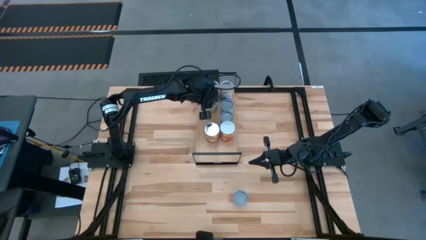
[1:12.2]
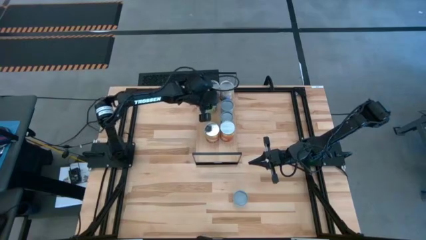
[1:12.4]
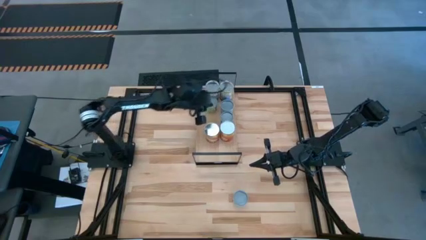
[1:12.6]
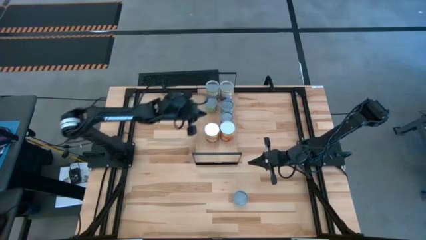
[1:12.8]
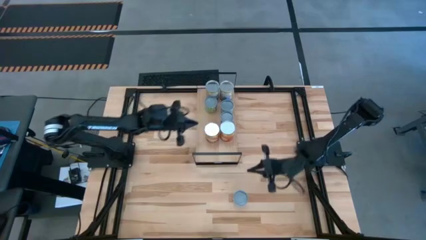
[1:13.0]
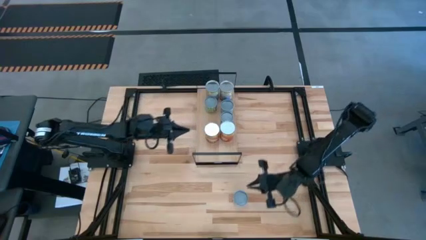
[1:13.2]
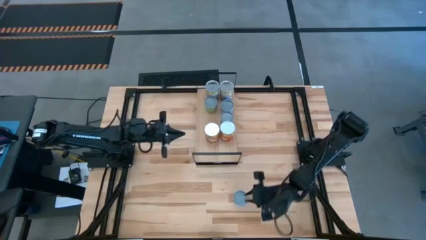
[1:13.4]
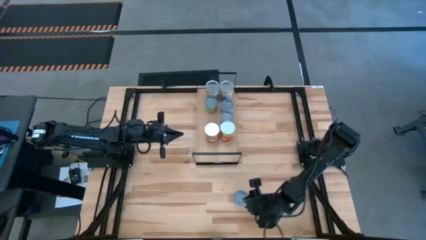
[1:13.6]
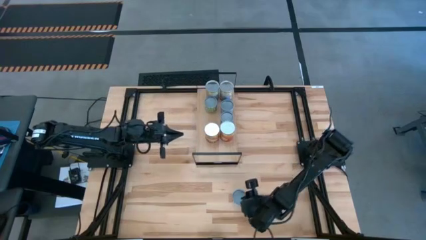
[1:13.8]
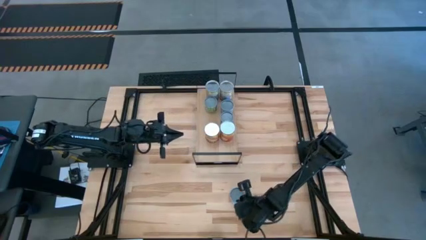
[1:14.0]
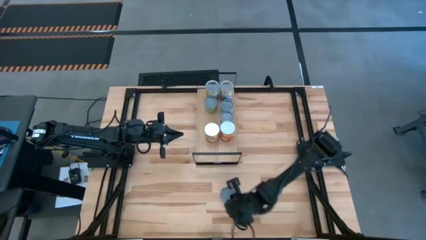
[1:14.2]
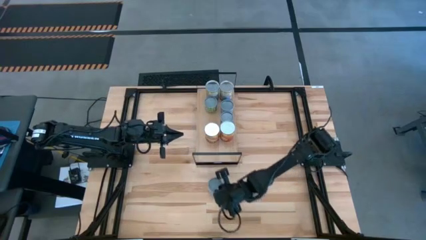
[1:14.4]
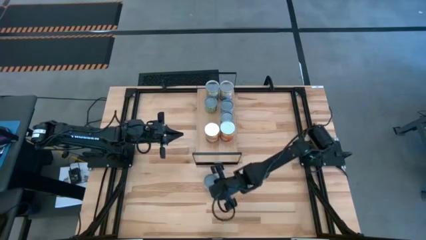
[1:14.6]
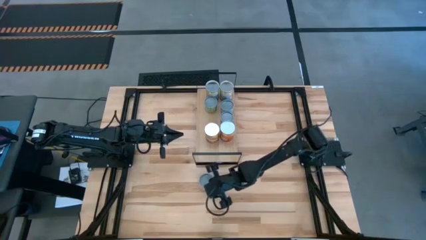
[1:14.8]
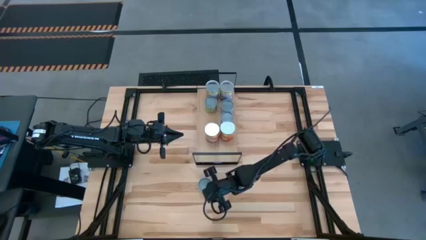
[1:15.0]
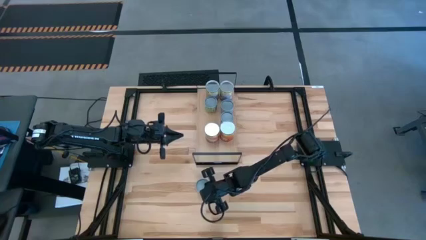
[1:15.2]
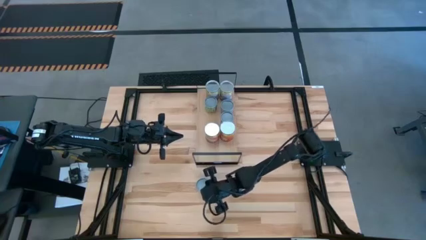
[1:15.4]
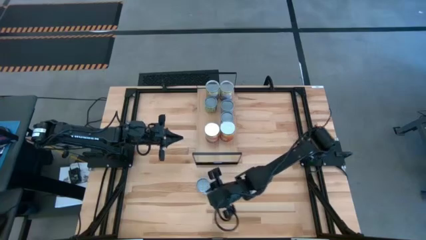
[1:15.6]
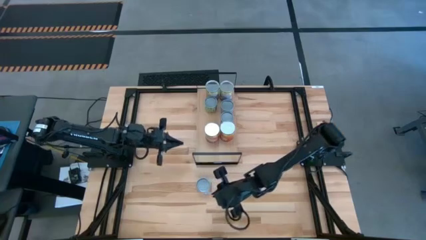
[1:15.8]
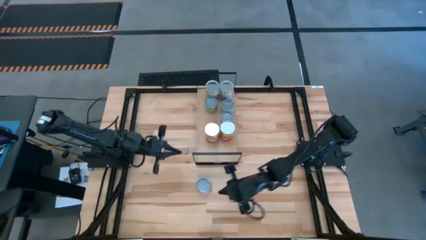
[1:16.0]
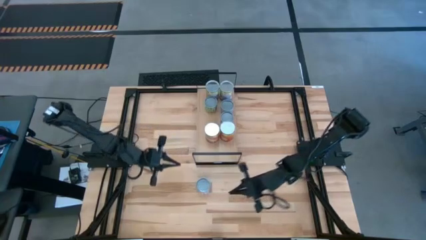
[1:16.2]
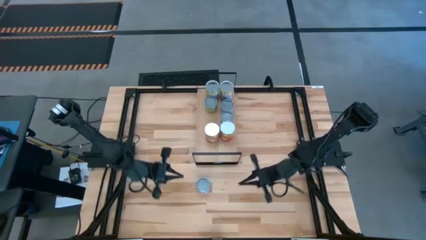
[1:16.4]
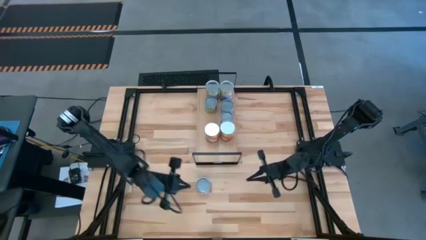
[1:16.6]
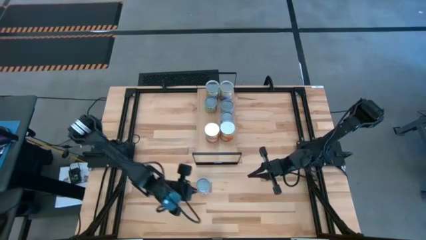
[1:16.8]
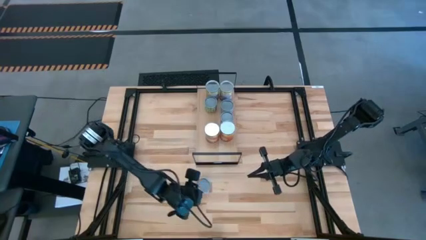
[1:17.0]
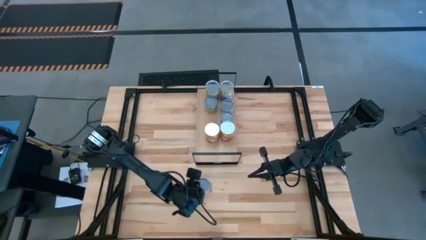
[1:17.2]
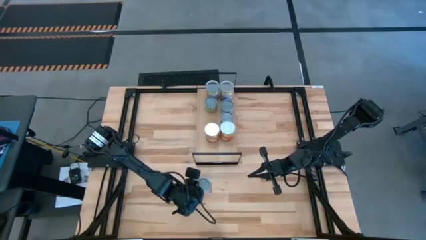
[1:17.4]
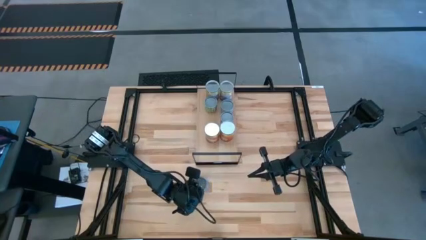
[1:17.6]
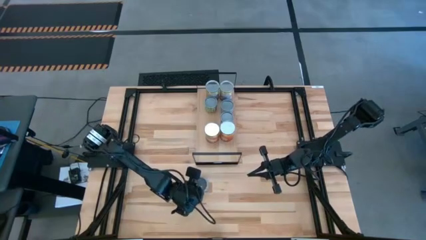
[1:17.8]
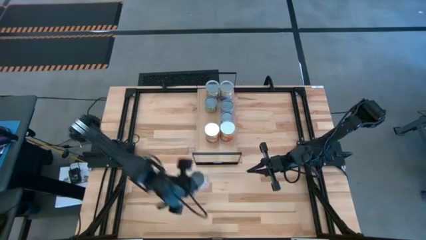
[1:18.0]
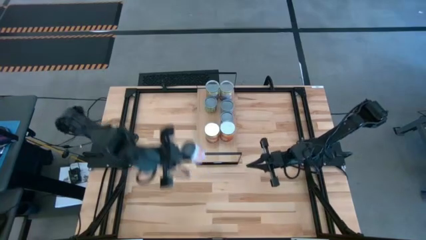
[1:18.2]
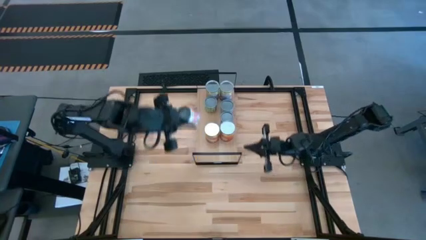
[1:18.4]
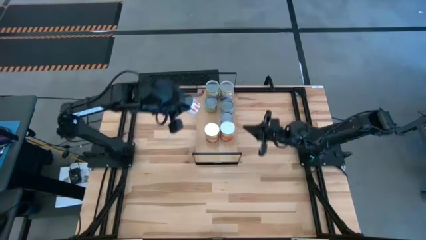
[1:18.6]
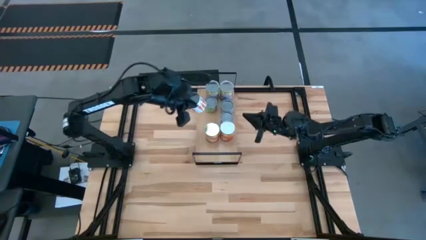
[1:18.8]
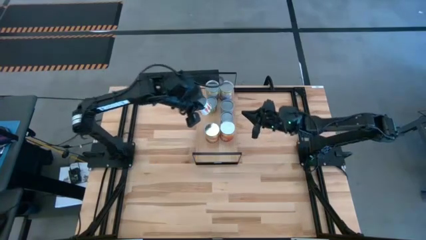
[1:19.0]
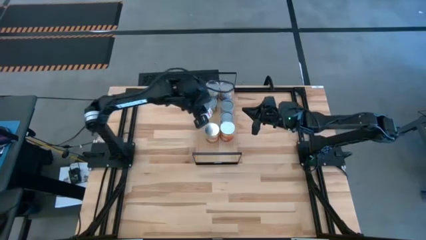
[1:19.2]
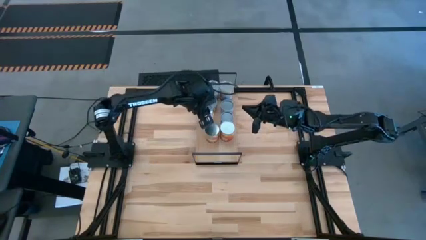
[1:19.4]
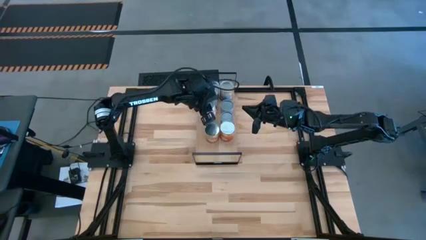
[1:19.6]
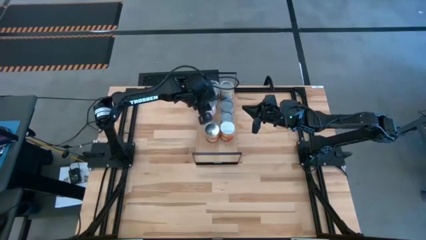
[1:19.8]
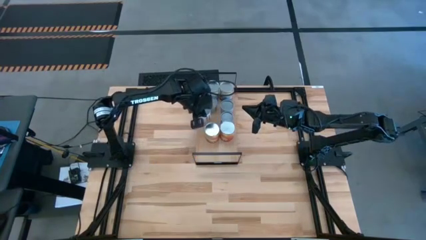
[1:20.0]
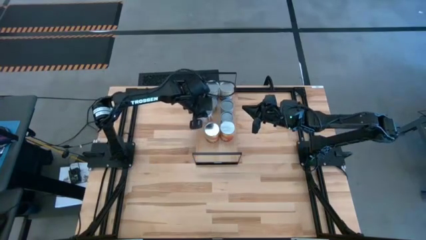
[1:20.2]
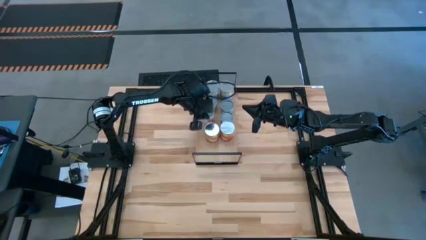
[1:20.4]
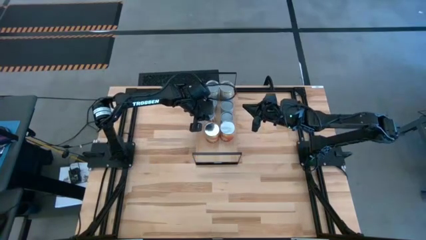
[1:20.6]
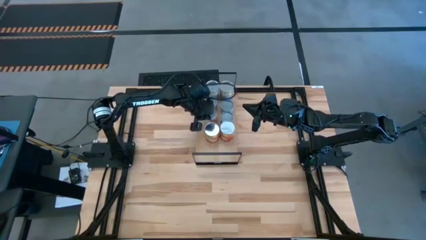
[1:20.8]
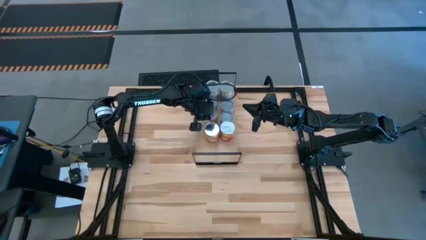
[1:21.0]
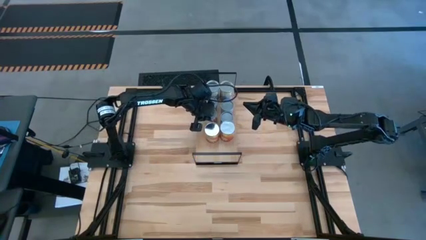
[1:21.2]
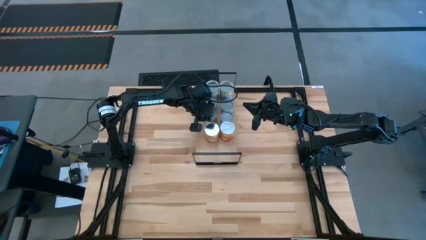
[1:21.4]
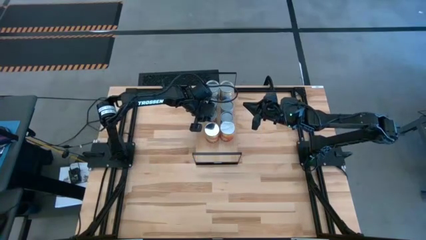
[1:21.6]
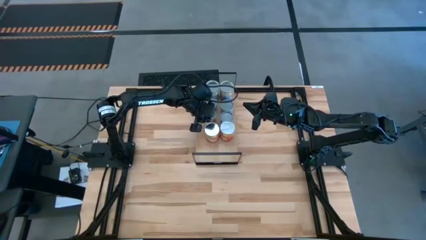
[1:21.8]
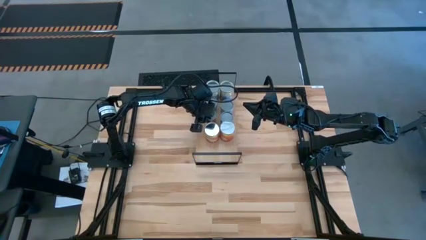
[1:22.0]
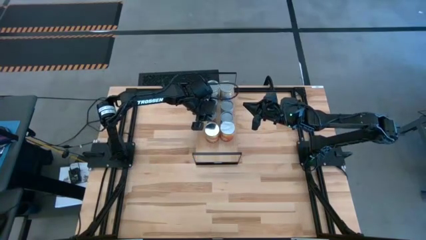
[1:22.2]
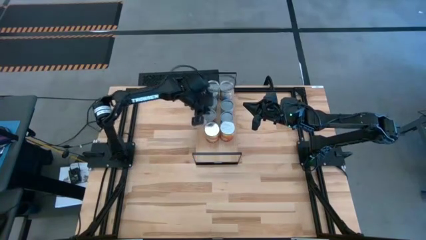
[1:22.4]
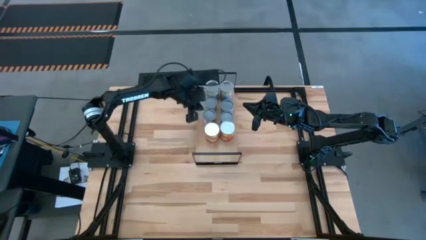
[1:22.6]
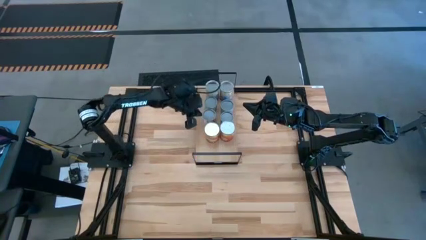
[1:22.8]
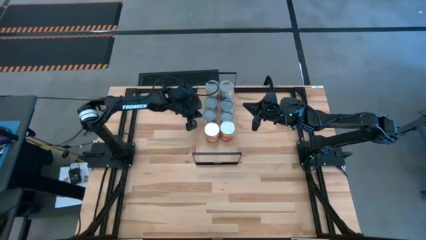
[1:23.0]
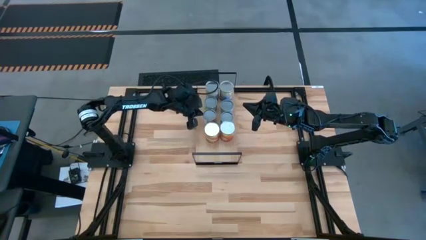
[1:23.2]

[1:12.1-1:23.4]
Task: Pick and place cans onto a shelf
Put the carrot can on the shelf

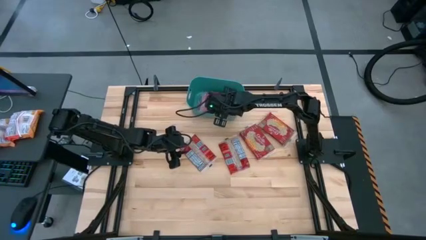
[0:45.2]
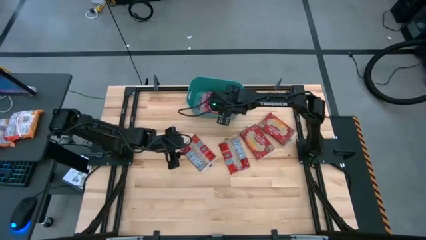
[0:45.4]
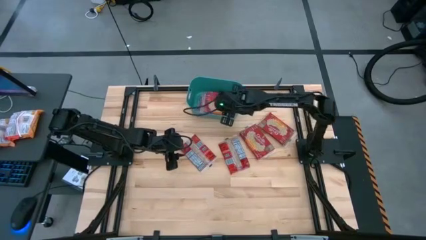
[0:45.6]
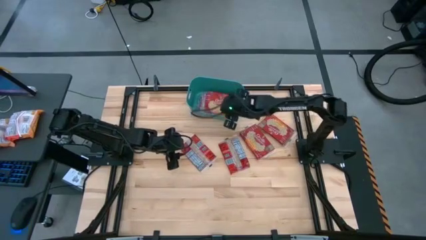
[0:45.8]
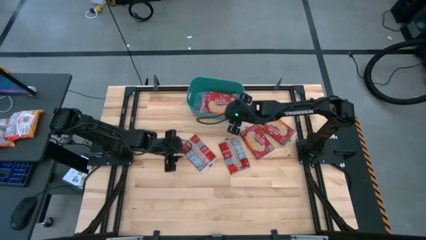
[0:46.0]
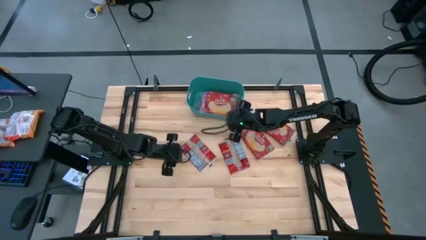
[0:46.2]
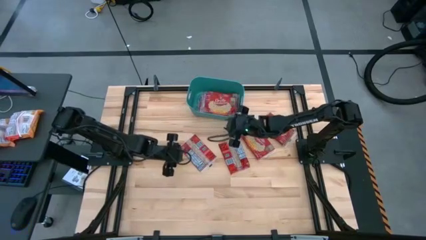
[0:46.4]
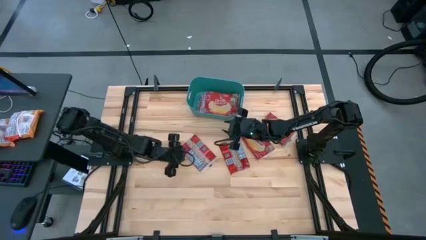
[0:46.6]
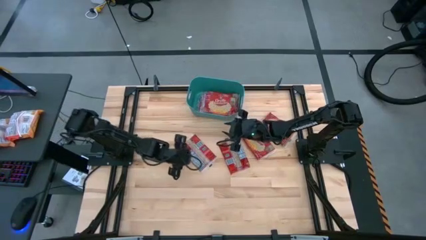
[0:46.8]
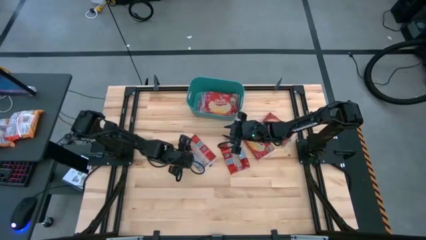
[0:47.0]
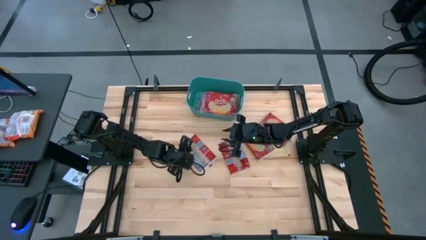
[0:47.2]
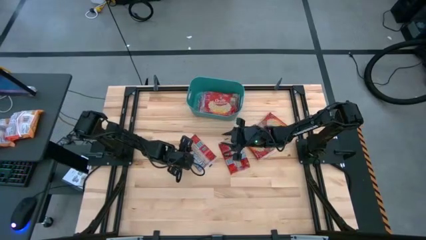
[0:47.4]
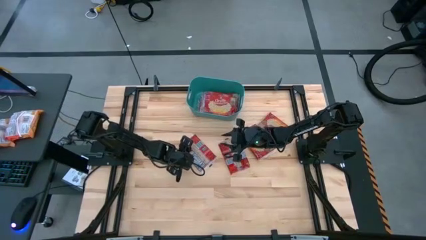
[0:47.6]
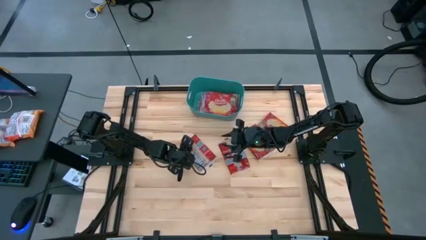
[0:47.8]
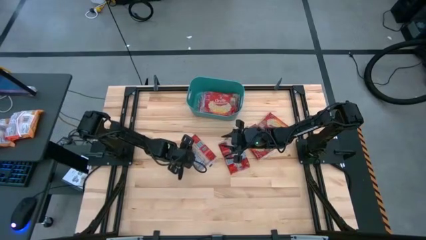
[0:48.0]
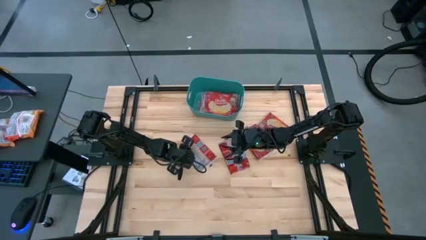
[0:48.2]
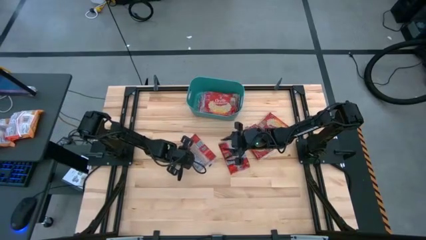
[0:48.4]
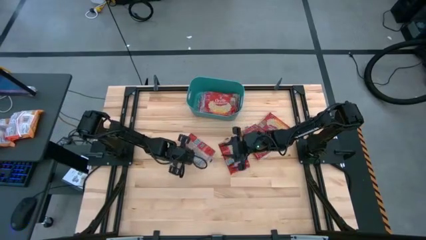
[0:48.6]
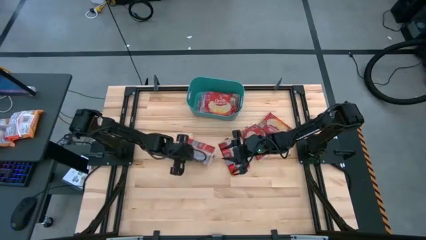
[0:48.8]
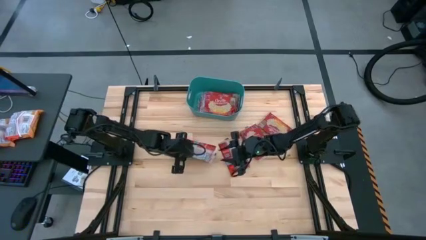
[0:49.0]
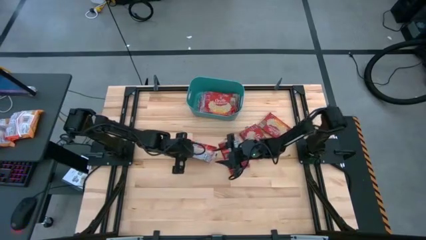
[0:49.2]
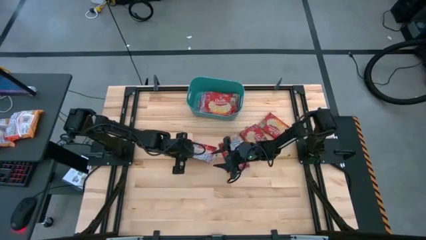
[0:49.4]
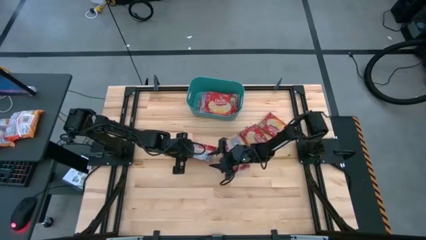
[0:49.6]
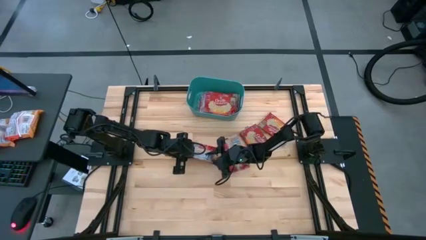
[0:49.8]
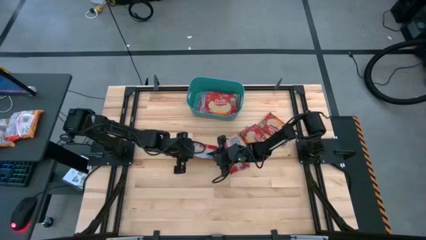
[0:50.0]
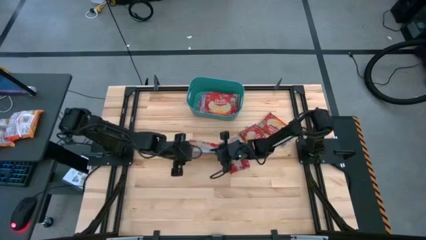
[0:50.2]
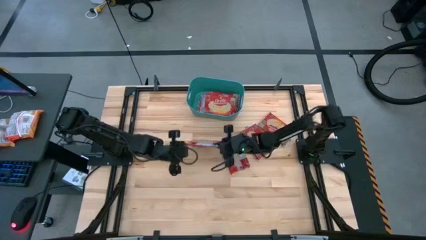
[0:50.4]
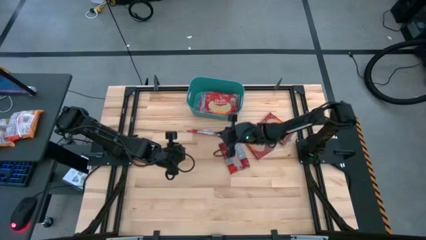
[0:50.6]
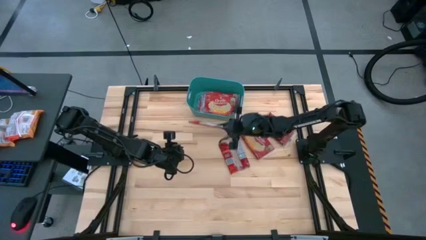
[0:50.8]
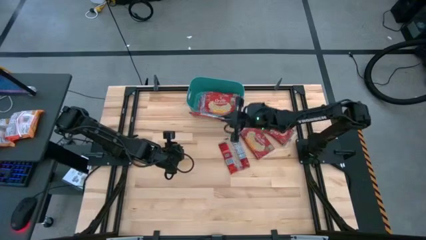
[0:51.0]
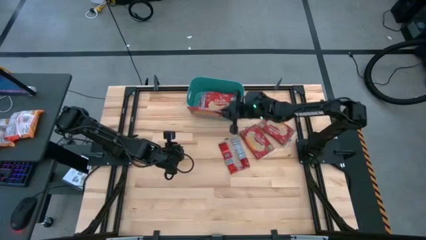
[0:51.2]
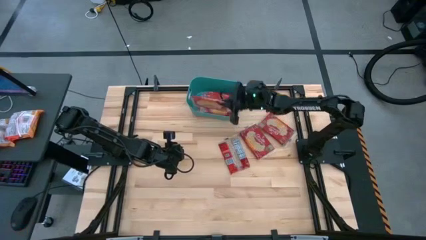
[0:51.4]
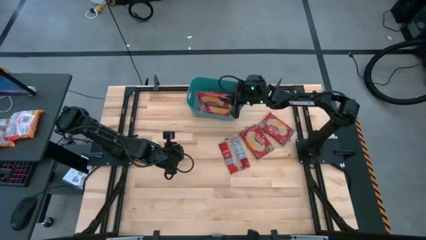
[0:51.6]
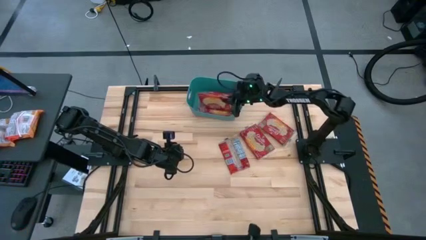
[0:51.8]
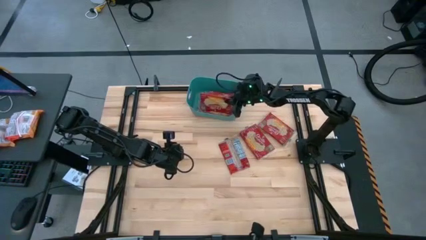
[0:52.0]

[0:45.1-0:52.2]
Task: Sort popcorn bags into baskets
Put the red popcorn bag into the green bin
